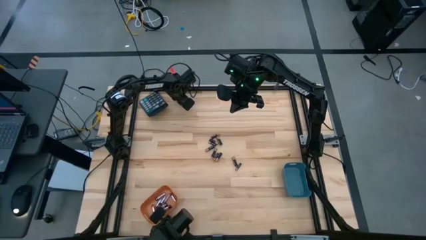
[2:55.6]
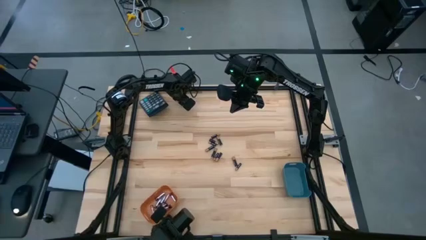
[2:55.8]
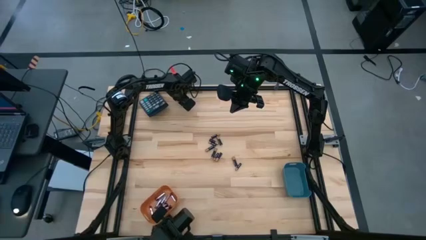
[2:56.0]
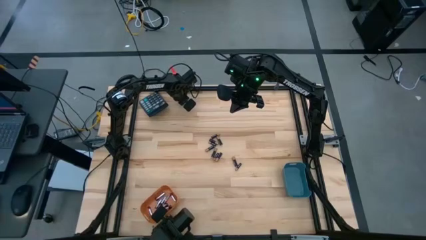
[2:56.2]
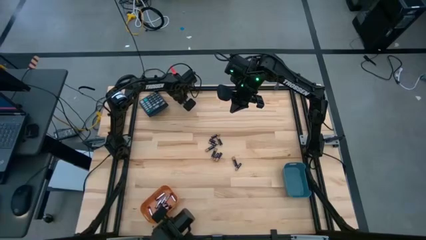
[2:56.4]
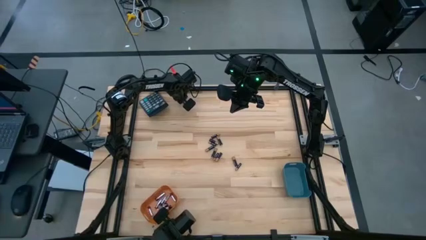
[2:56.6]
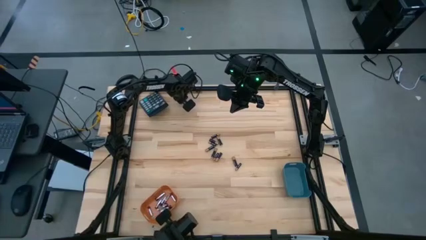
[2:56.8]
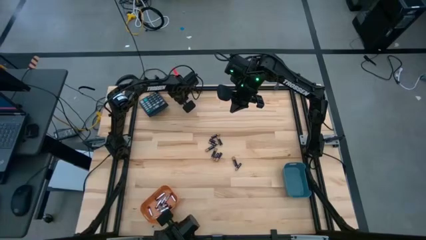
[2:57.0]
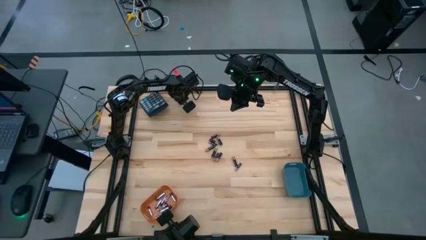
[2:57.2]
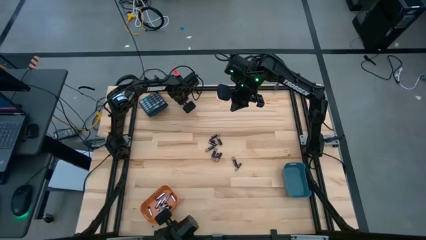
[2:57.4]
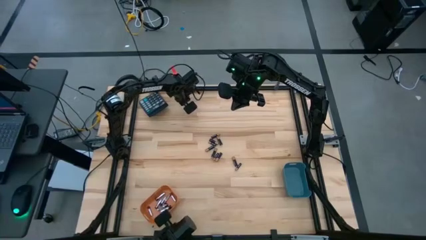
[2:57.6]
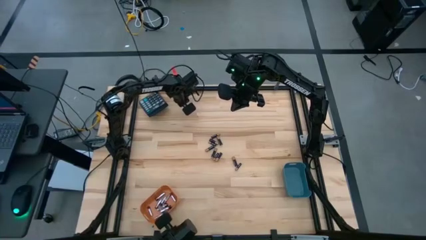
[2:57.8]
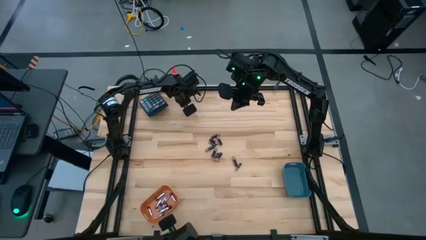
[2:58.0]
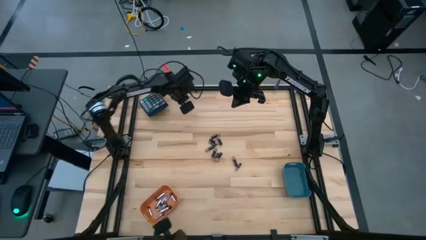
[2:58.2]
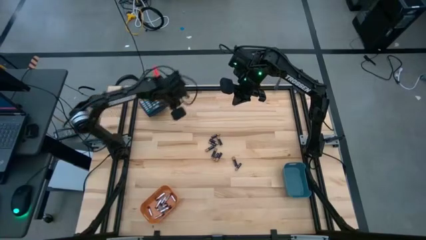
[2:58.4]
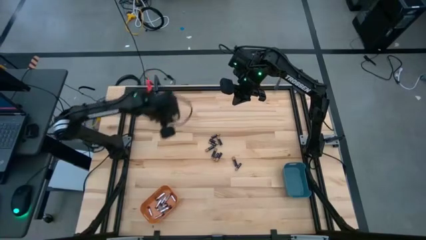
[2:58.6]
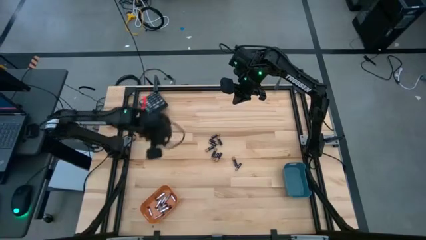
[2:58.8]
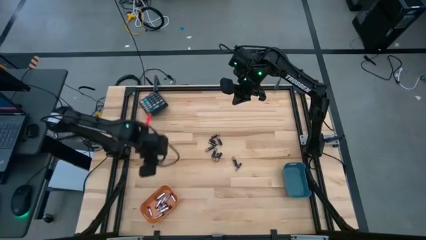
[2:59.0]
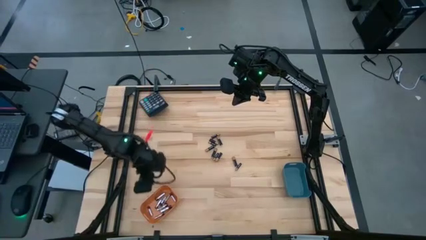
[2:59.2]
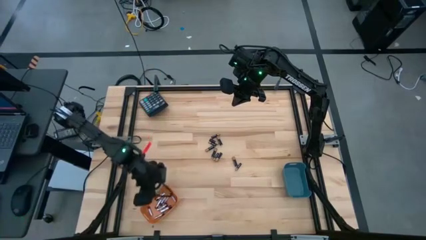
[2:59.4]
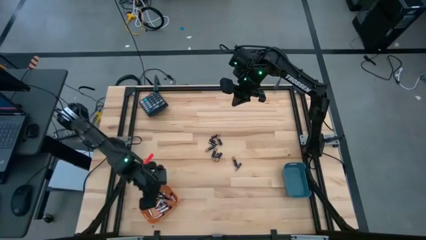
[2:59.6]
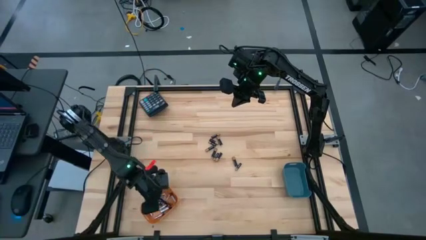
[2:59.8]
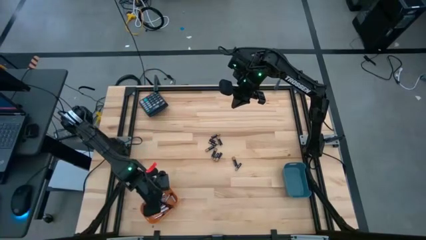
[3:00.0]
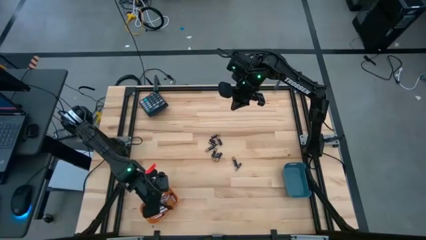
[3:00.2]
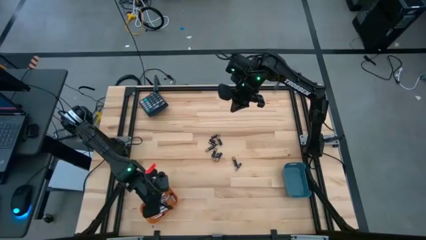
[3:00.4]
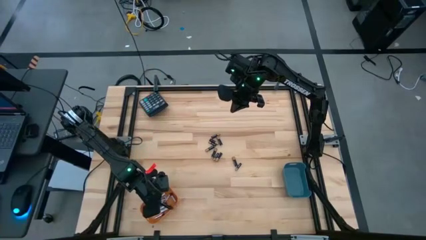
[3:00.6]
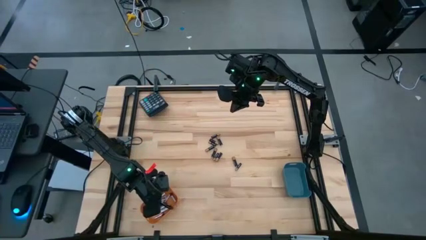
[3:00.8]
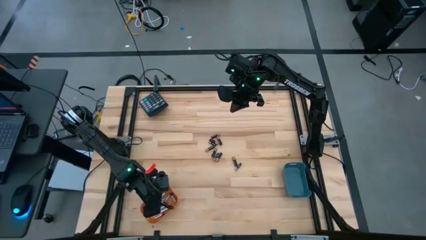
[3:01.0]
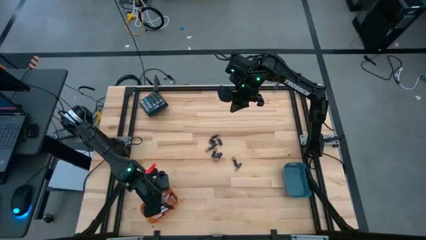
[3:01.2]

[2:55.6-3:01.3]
Task: Sort batteries
Put the silver battery into the orange bin

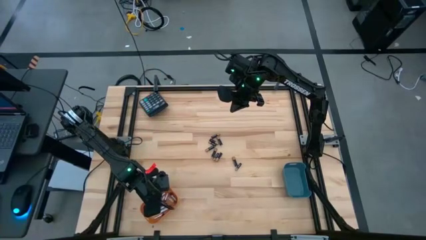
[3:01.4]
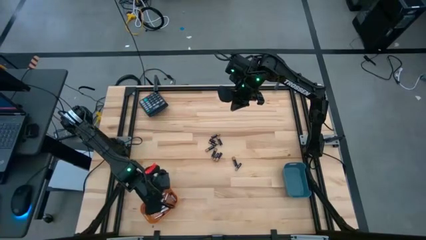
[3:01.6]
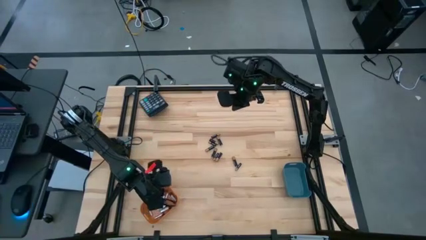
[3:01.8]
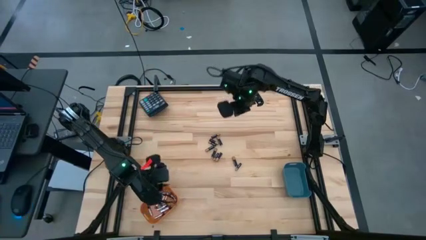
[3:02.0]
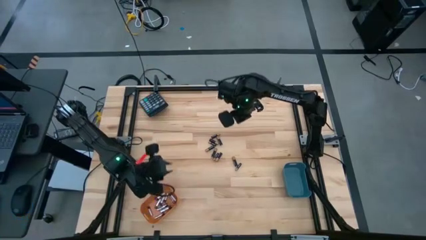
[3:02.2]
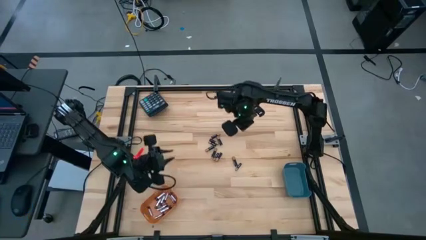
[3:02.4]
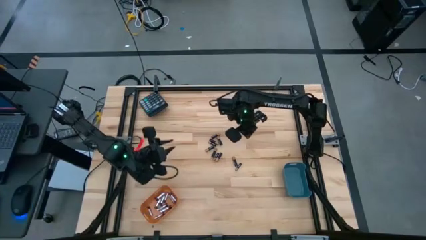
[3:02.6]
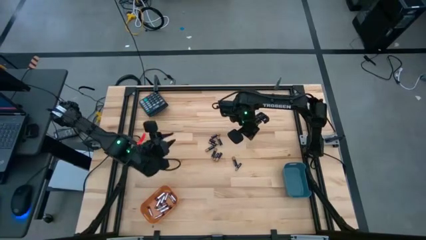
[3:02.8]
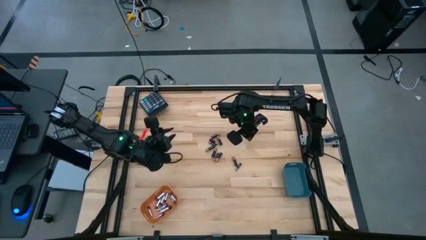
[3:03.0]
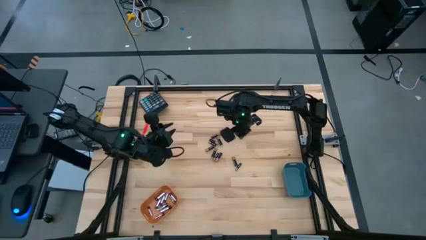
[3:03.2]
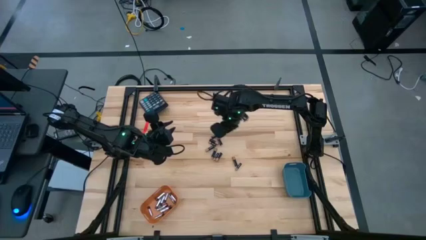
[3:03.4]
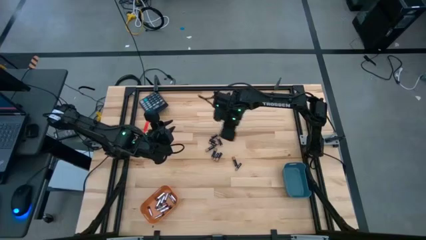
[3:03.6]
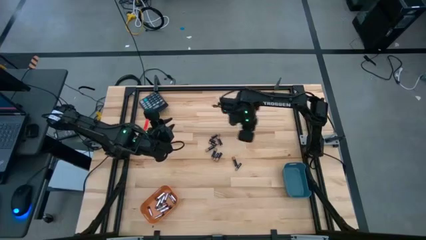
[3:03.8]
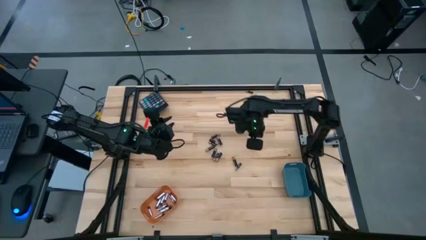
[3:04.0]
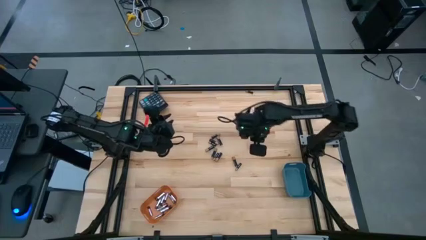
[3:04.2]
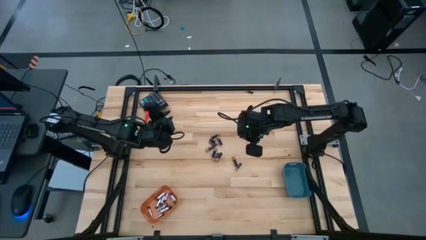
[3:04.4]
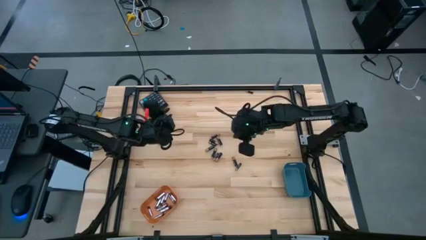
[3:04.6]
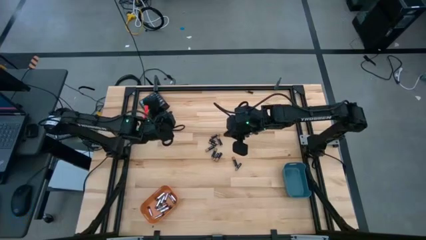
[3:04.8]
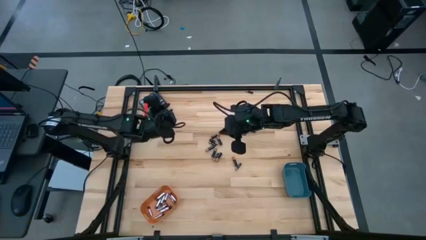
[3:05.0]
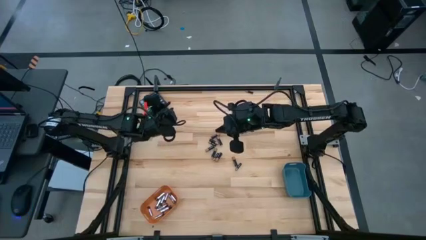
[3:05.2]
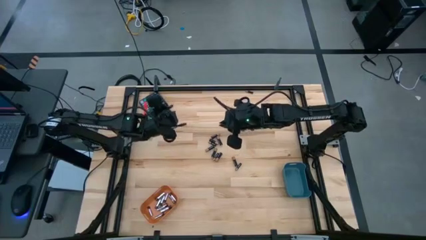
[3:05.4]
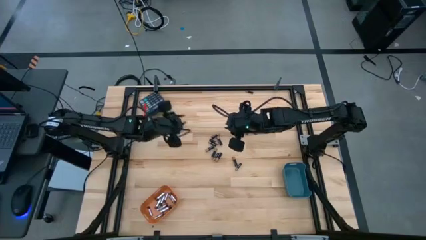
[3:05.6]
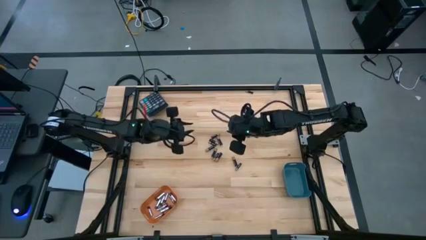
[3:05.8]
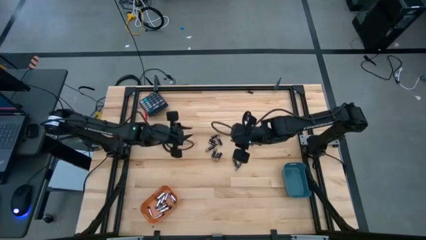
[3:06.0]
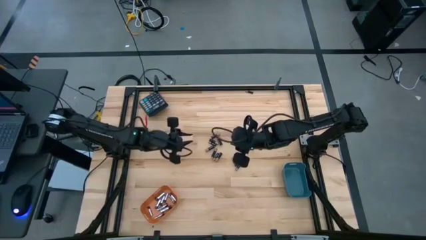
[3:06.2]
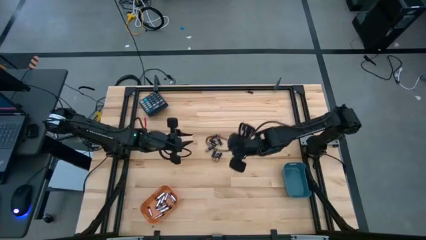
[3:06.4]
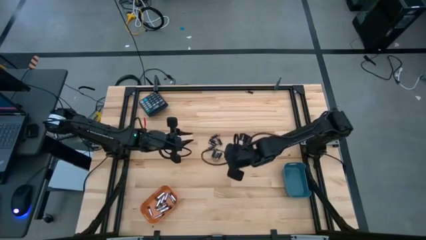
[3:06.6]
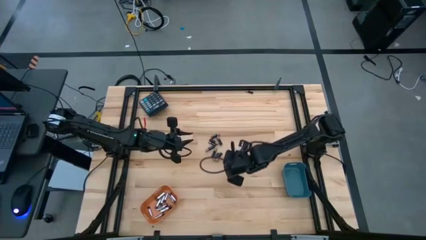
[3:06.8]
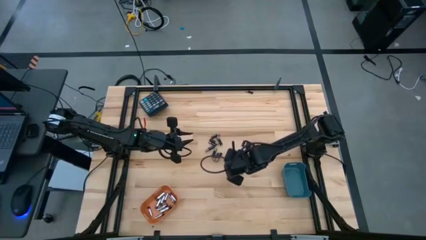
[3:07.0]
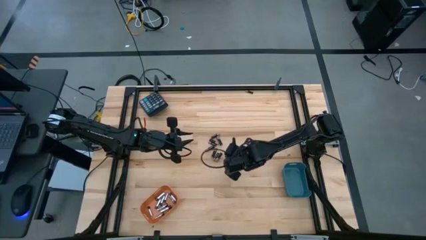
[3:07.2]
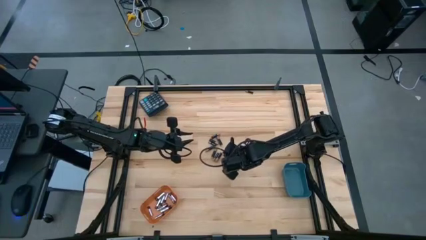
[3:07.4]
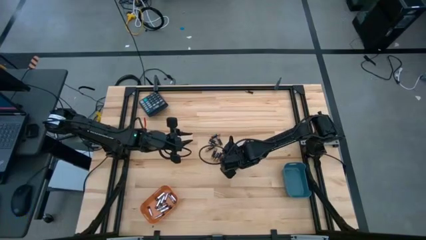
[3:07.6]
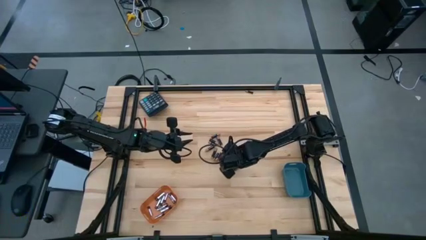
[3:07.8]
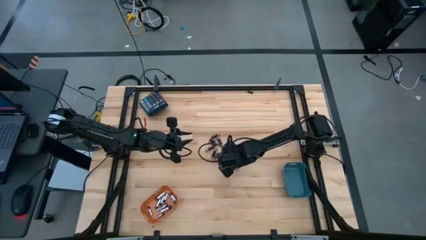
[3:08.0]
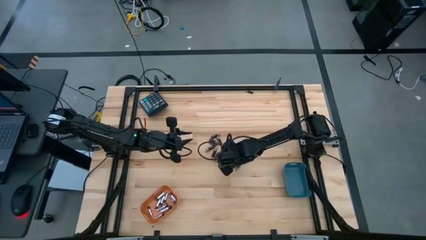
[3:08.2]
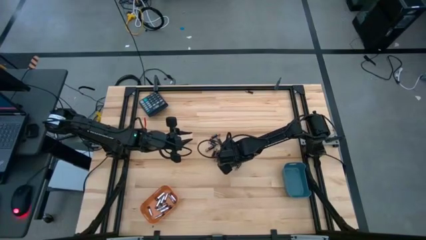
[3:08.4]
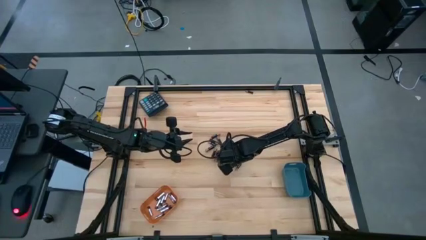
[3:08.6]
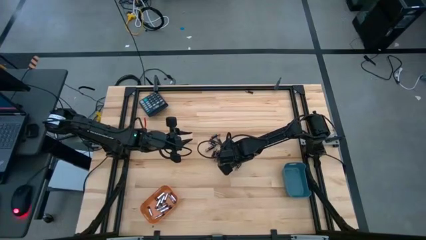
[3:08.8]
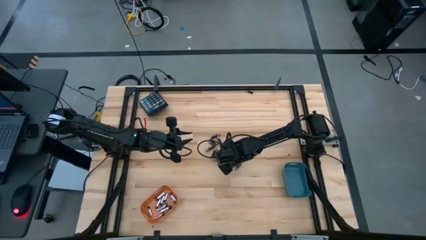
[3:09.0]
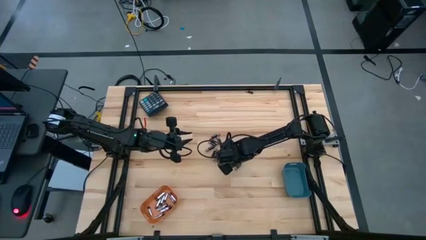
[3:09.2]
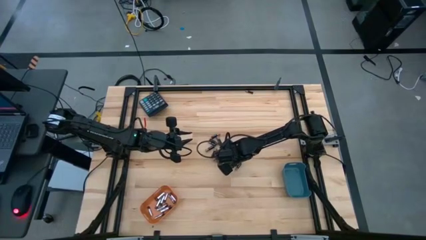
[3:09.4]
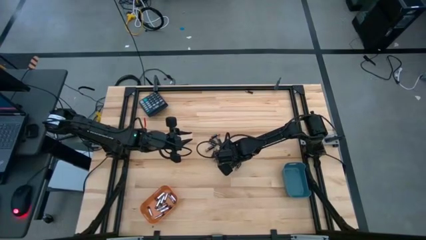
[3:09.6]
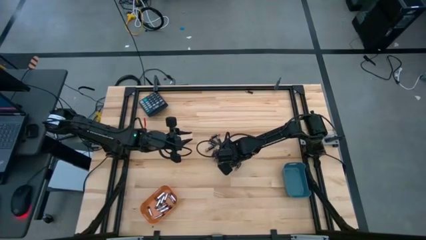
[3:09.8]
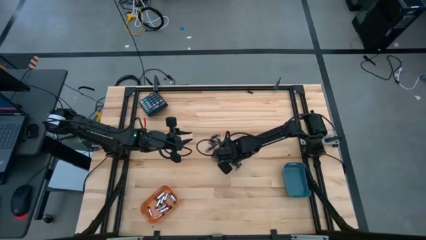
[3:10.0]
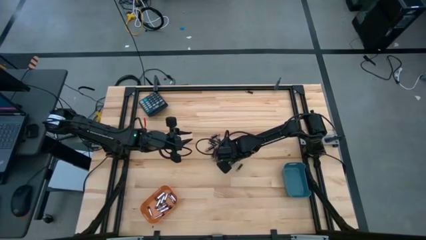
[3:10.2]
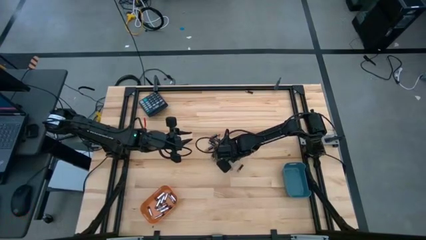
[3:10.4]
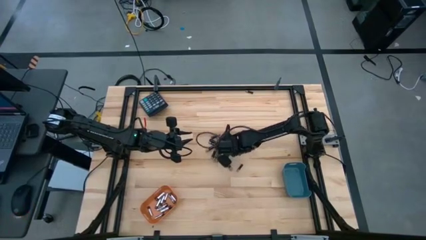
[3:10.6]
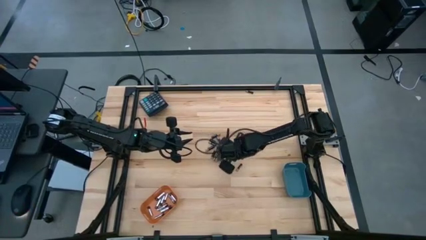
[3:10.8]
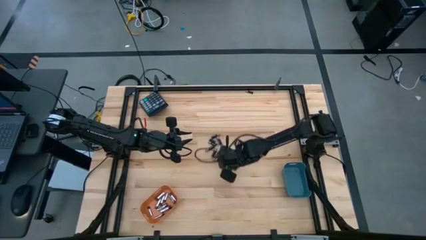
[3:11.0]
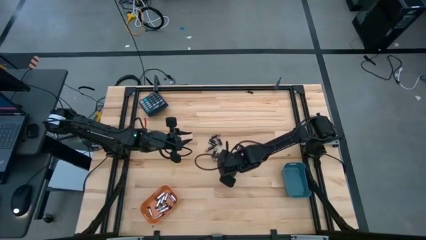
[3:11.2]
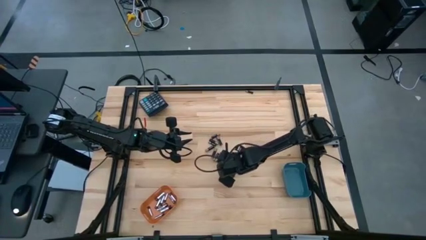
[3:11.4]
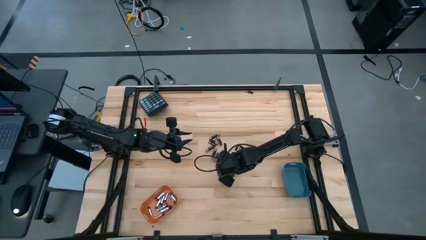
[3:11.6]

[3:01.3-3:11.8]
Put the black battery into the blue bin

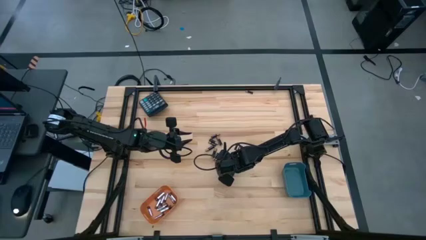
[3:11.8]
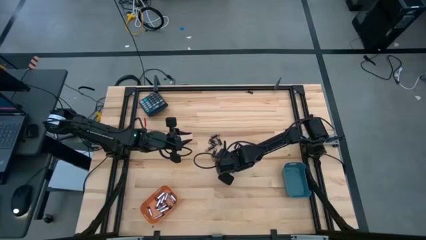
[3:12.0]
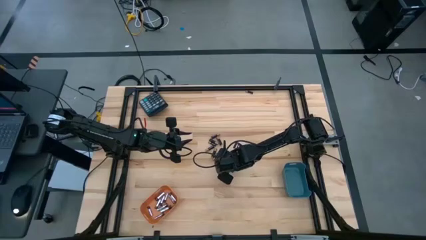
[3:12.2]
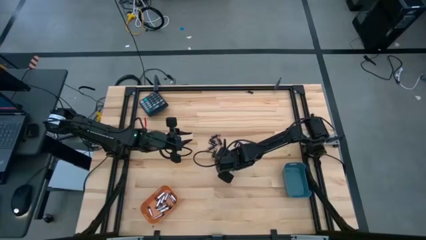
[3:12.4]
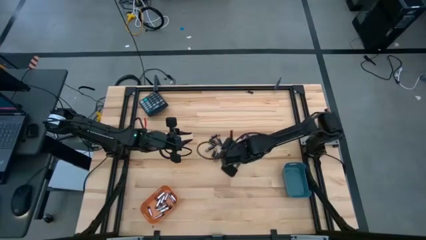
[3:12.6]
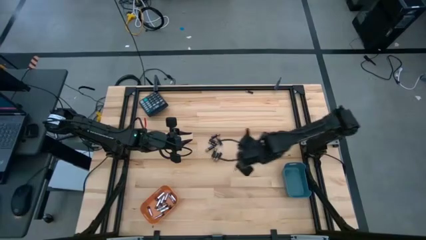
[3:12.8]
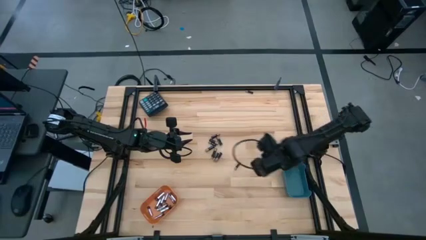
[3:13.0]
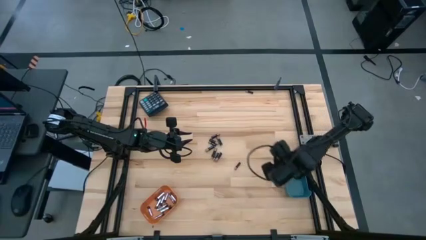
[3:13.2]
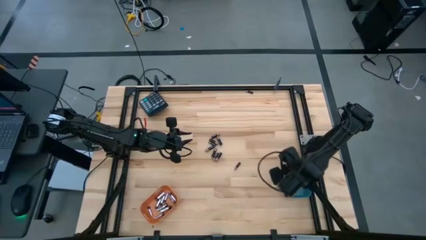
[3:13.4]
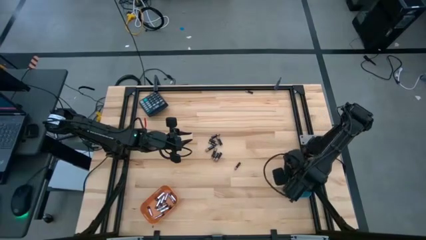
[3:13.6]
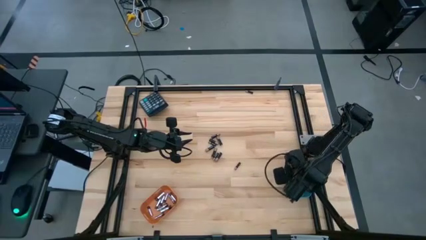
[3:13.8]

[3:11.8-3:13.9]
Put the black battery into the blue bin
